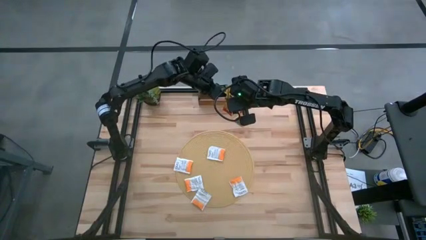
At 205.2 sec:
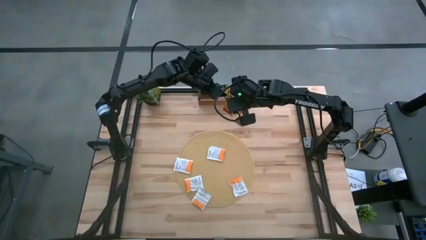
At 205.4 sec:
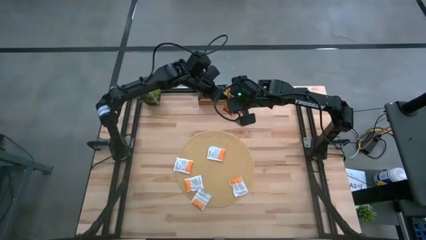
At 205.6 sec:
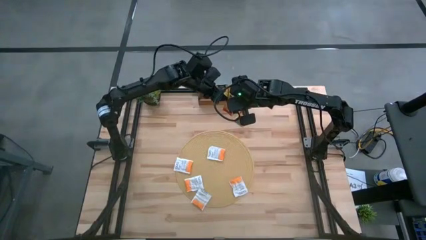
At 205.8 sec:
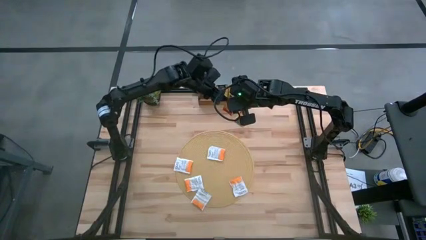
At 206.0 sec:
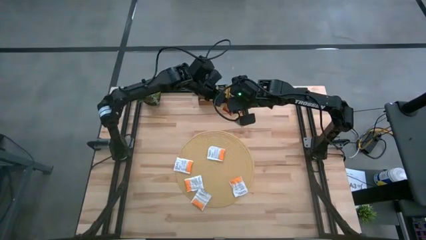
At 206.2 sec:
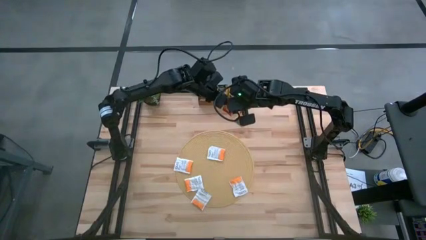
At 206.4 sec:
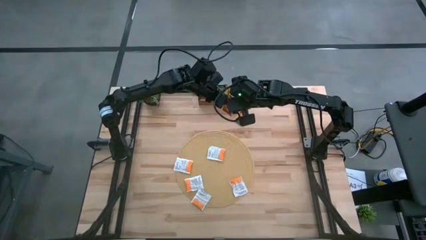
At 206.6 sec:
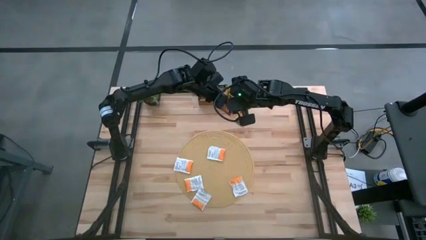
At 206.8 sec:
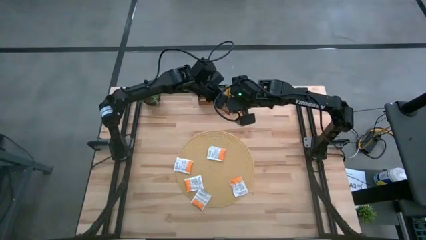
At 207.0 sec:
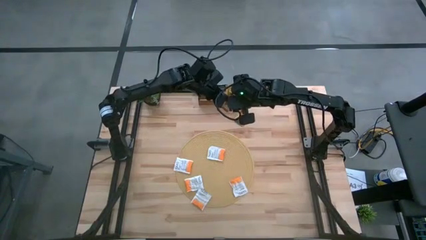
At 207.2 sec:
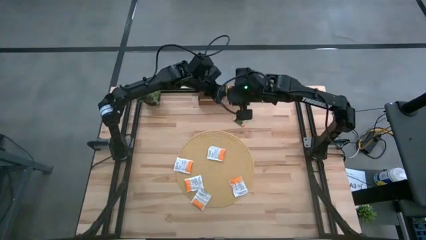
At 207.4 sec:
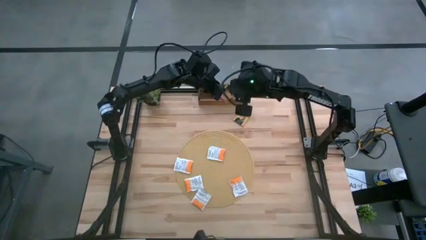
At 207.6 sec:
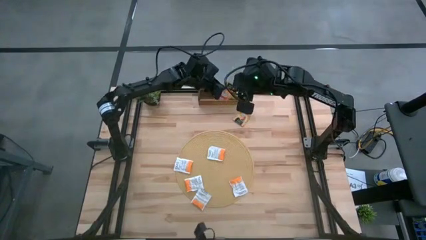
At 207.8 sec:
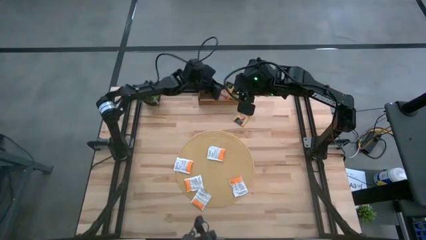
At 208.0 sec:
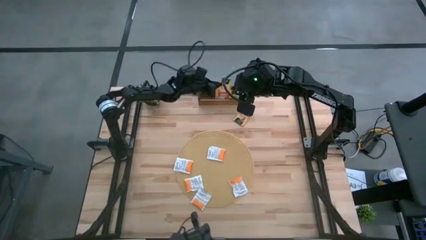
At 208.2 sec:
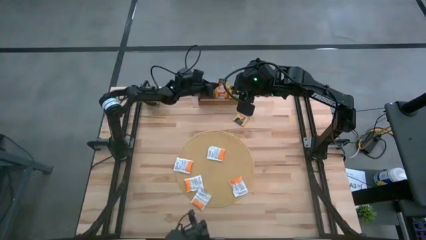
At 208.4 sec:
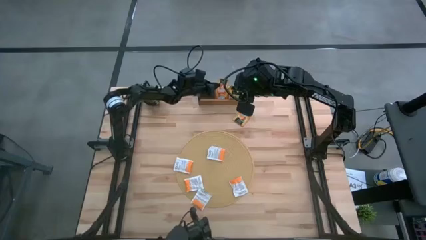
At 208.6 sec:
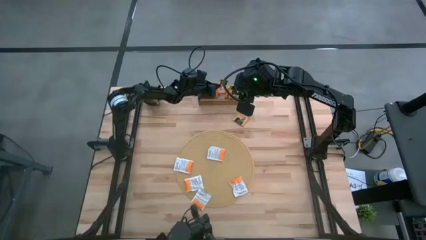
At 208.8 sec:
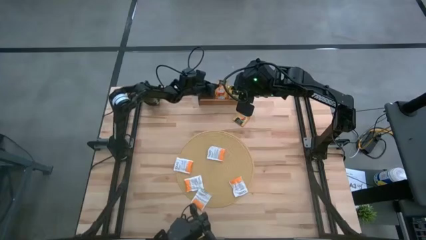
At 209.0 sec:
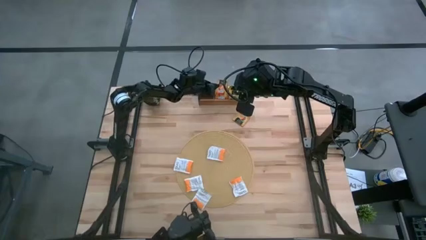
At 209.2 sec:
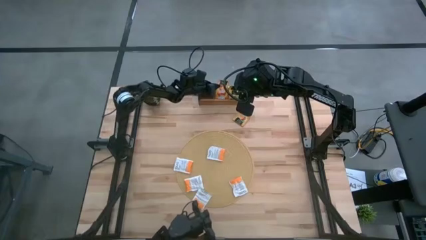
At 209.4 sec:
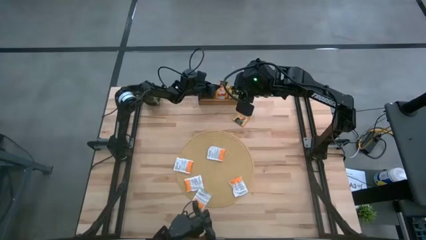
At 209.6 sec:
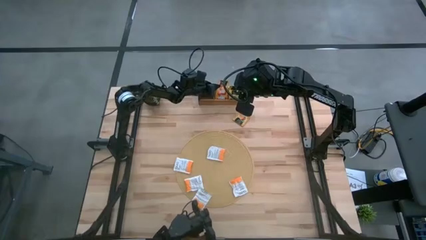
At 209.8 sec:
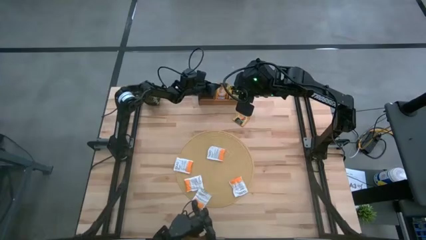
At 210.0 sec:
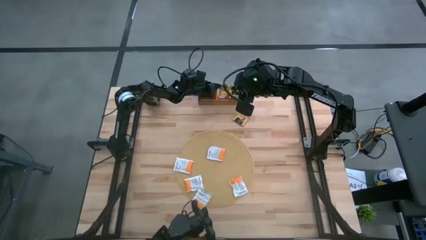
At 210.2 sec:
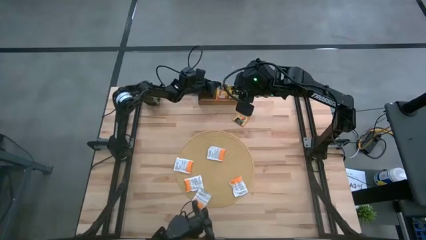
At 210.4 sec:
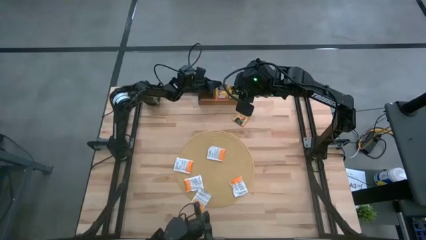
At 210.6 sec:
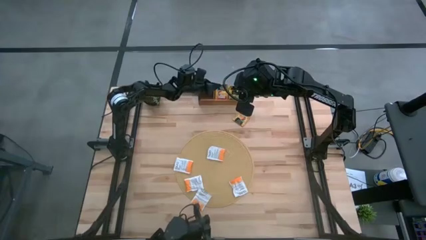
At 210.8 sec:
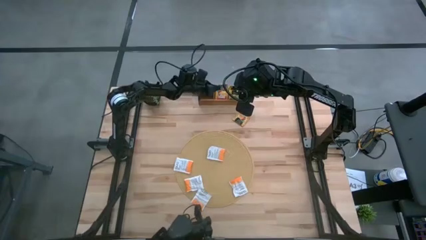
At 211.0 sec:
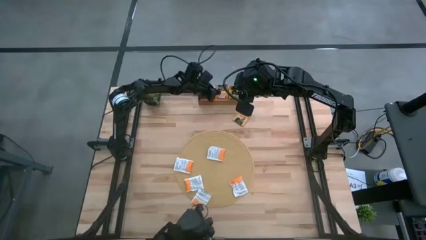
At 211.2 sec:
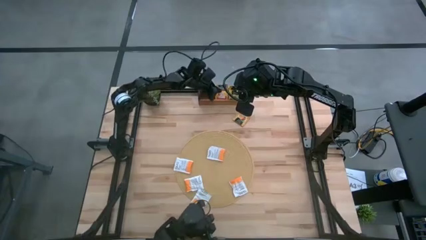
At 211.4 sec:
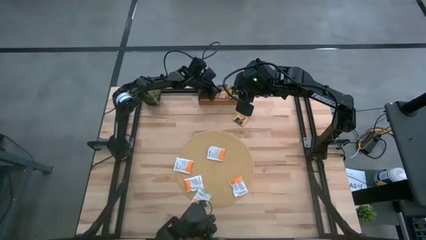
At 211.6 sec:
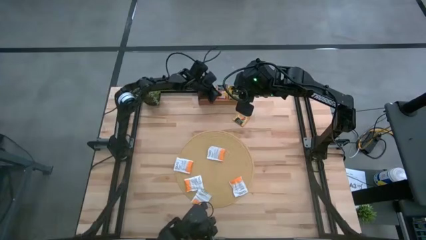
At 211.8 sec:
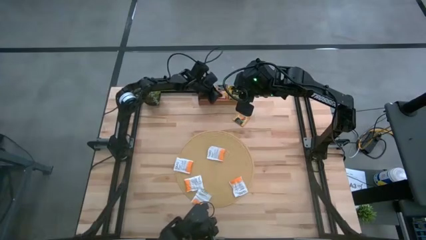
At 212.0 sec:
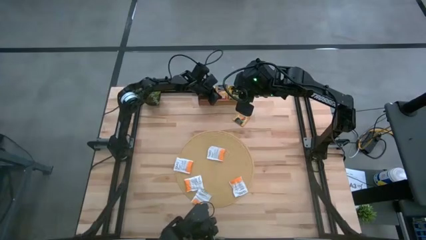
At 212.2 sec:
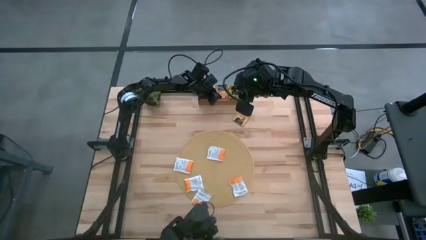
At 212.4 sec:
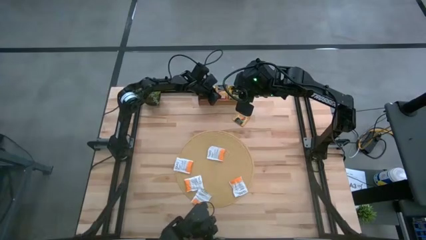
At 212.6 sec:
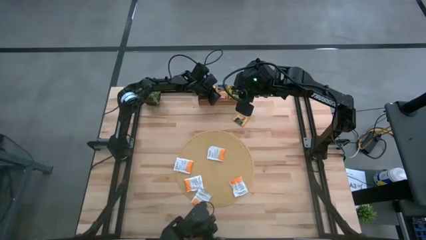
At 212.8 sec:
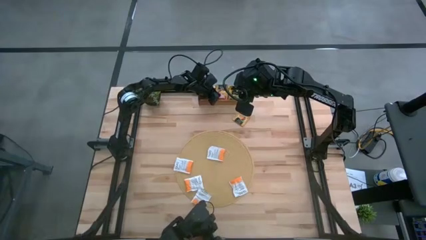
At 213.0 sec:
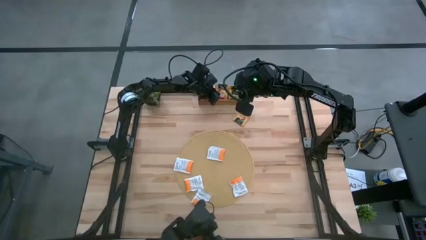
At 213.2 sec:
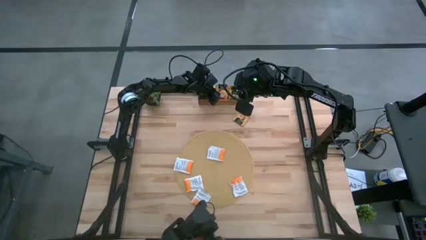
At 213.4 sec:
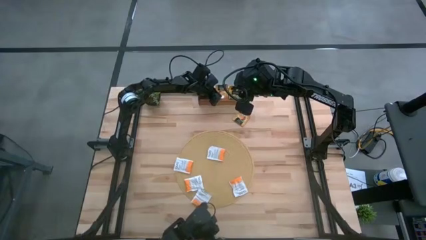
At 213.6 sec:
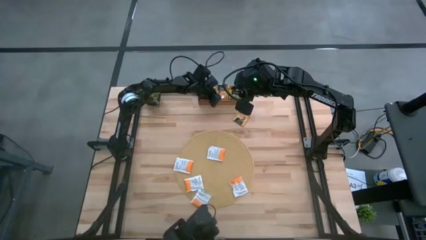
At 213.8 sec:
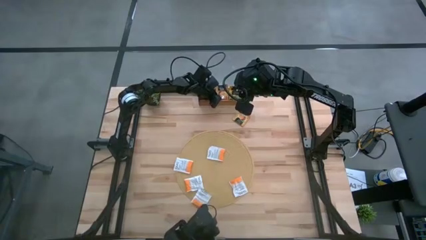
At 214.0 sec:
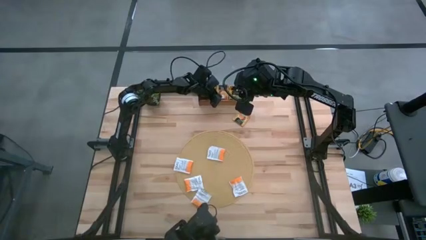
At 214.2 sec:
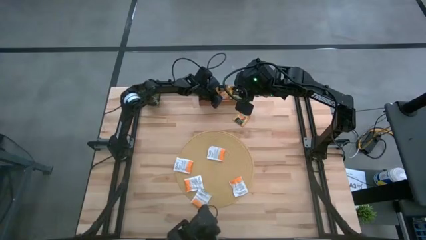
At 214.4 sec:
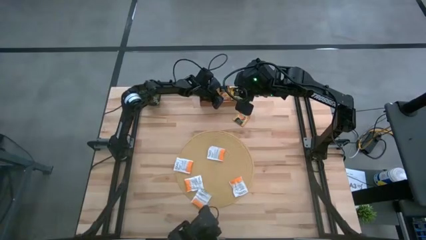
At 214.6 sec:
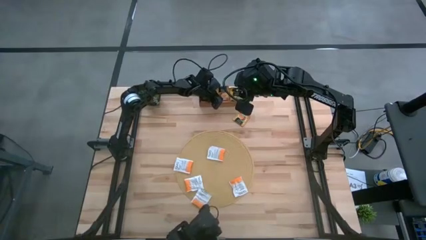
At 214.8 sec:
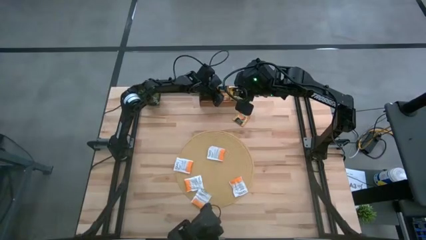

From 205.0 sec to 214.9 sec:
Task: Pick & Place Tea
Put the right red tea bag into the middle section of the wooden organizer

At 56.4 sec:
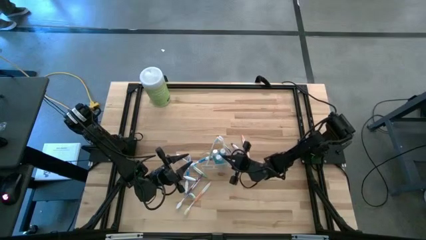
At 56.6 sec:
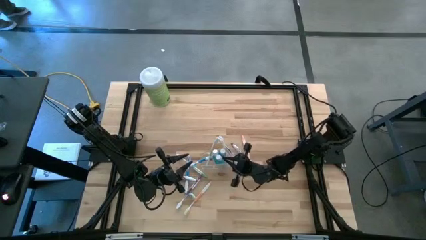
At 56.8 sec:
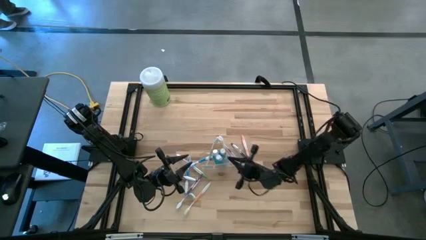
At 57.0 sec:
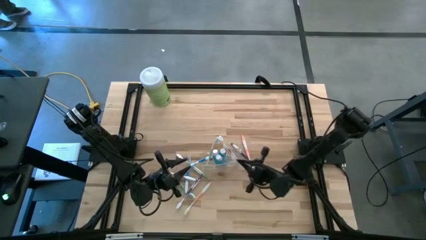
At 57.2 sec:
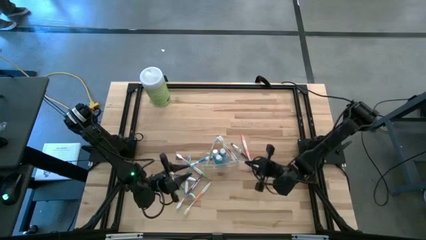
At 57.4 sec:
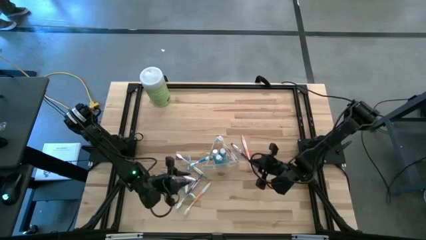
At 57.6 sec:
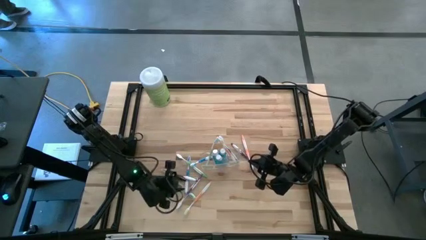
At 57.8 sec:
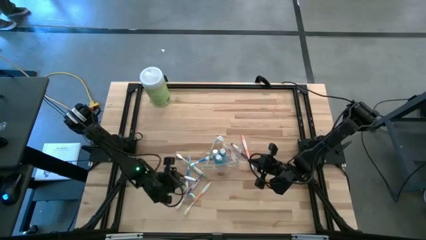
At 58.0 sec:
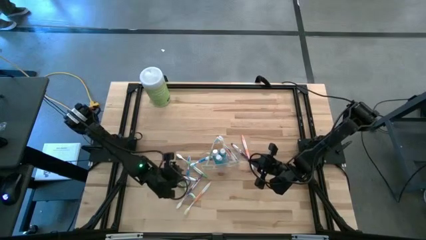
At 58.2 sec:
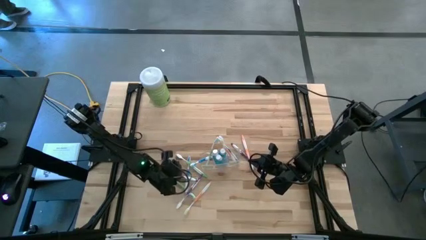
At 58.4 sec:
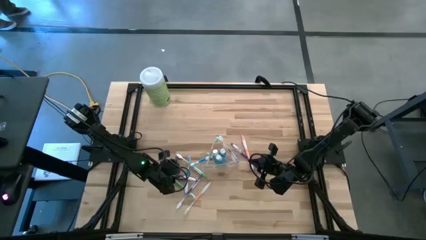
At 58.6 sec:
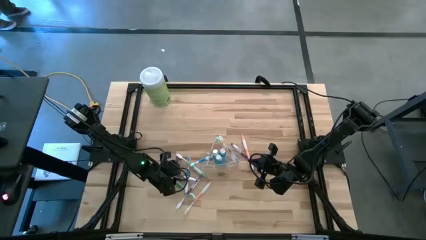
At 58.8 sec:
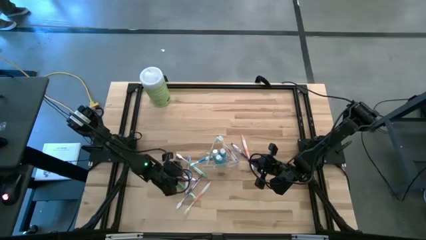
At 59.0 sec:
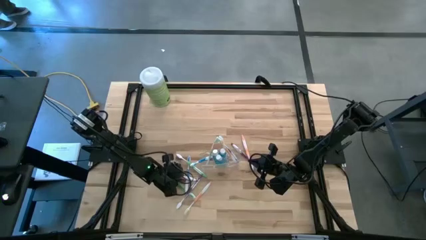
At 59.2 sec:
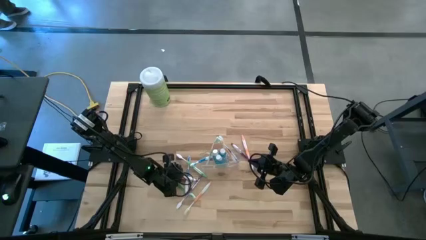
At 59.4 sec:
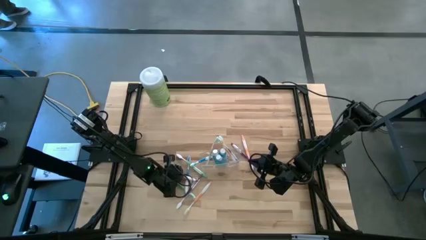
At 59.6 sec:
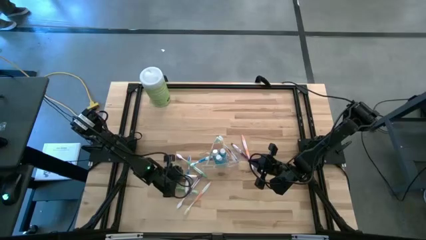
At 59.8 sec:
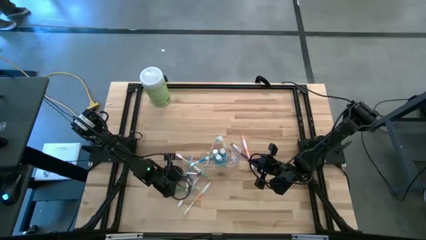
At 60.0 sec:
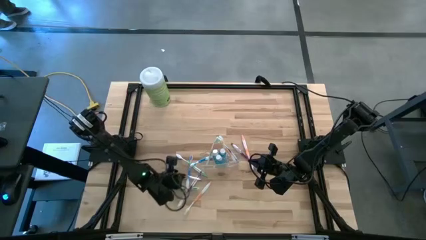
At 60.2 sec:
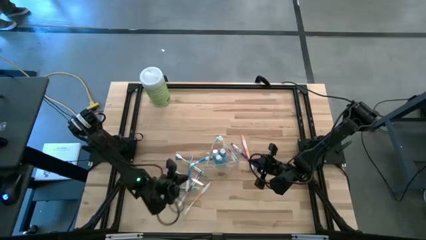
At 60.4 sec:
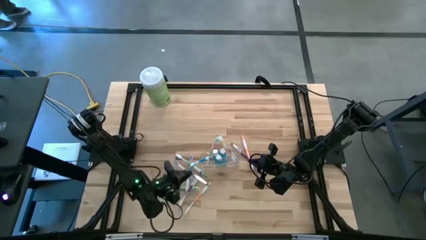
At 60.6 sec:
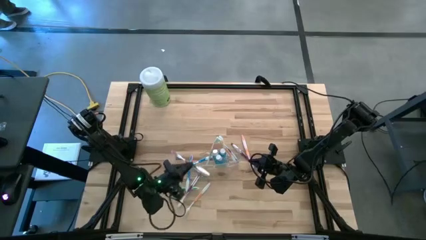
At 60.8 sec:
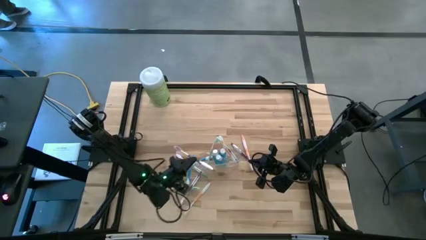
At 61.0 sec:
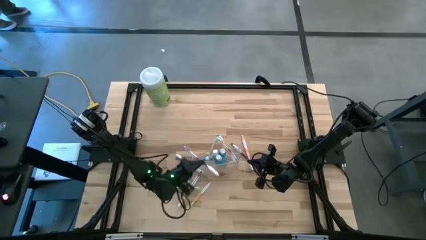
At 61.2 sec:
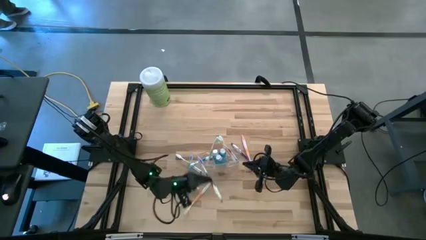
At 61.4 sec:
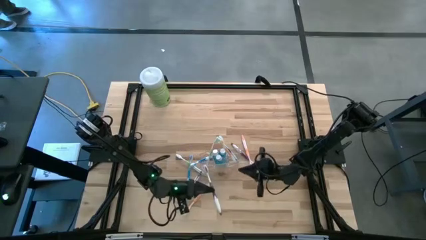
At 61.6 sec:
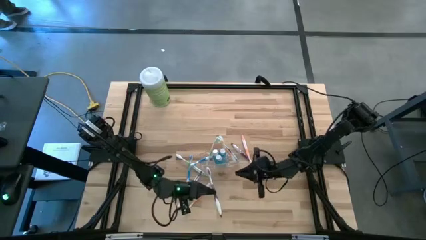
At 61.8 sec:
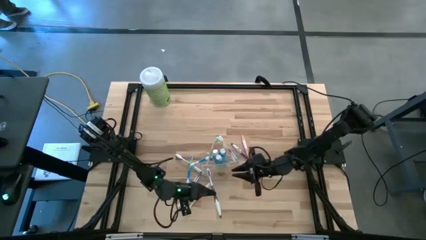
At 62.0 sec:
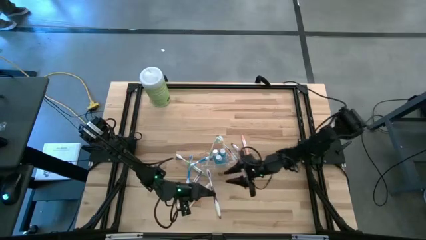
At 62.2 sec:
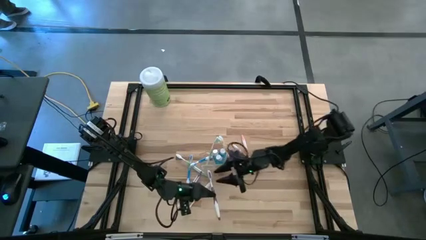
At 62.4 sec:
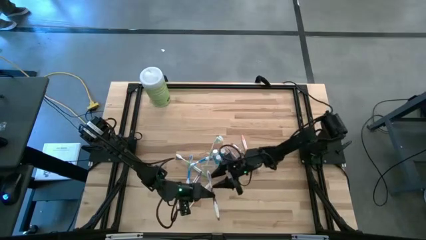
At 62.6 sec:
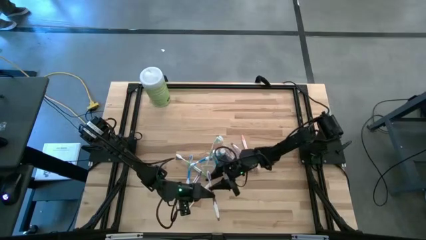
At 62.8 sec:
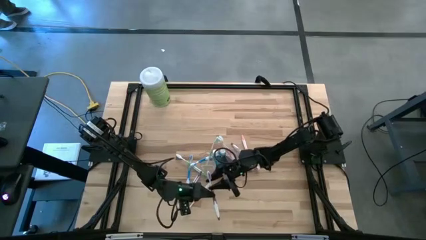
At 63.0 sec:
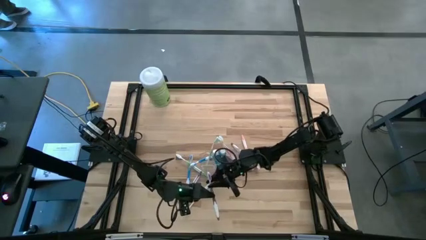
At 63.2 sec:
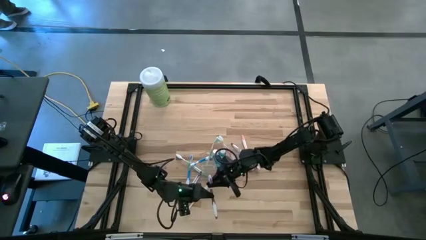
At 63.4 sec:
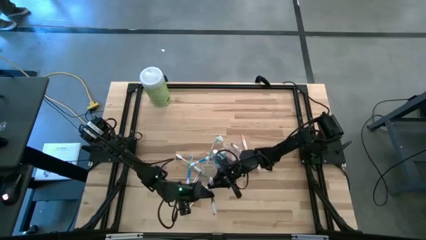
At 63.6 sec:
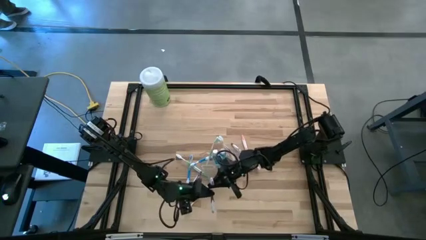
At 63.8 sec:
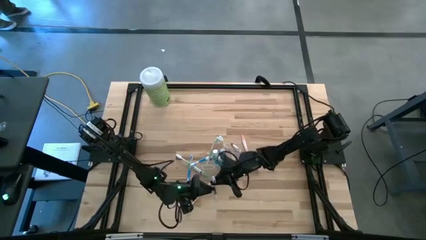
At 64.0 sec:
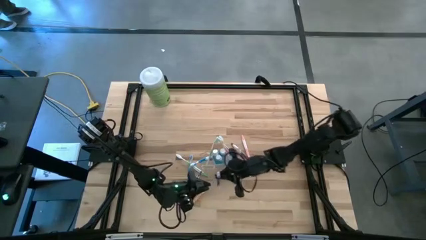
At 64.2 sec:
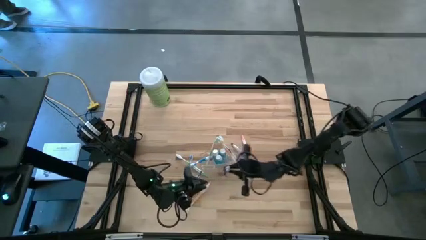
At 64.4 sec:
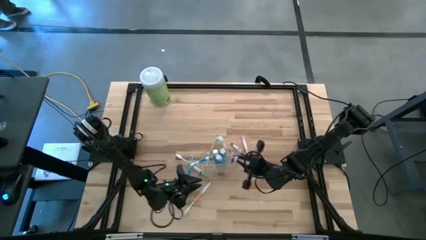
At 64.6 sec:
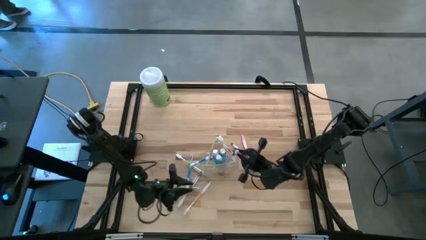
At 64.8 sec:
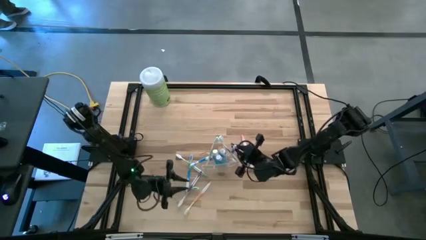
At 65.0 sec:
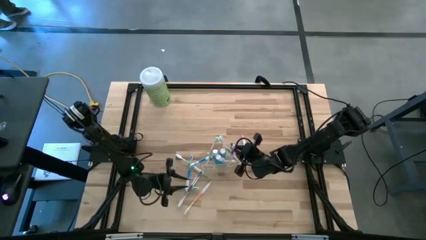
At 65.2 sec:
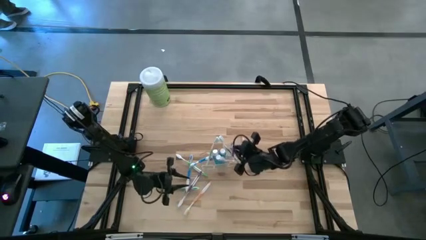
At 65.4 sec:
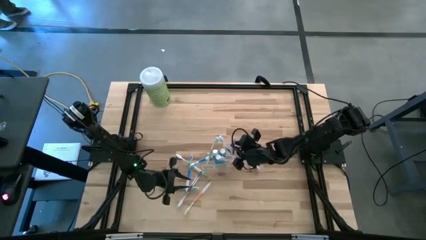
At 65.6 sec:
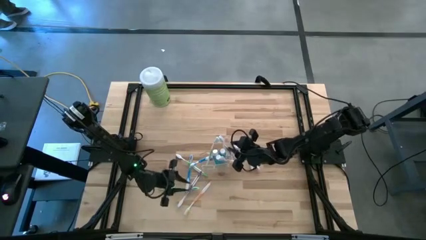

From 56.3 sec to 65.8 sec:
Task: Pick & Place toothbrushing station
Put the left violet toothbrush into the transparent organizer
